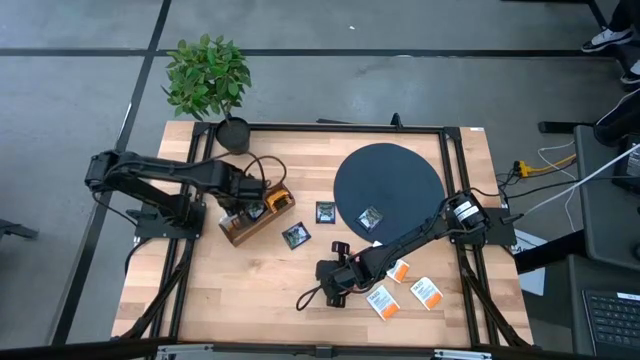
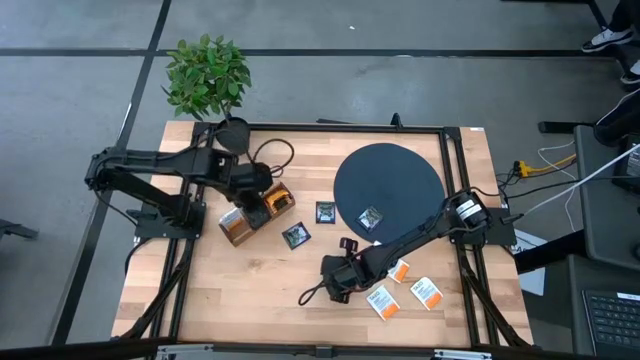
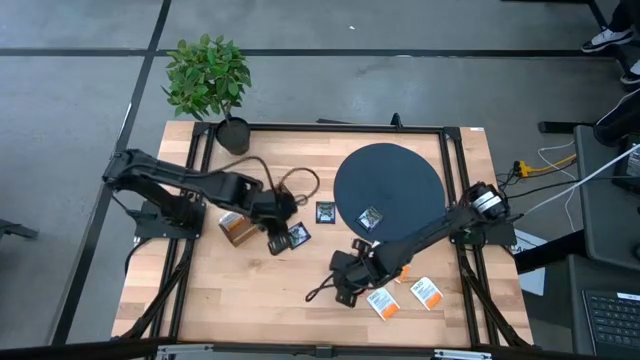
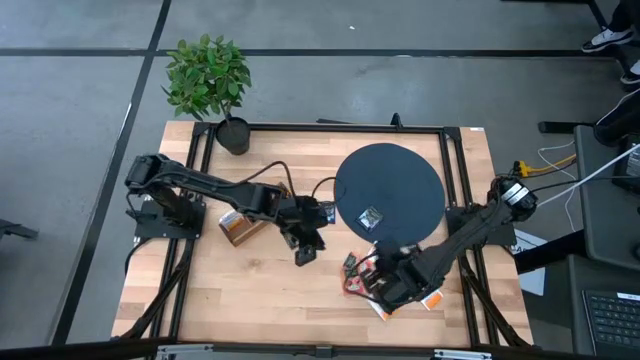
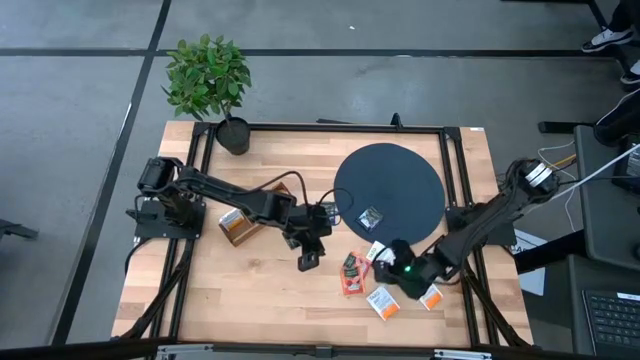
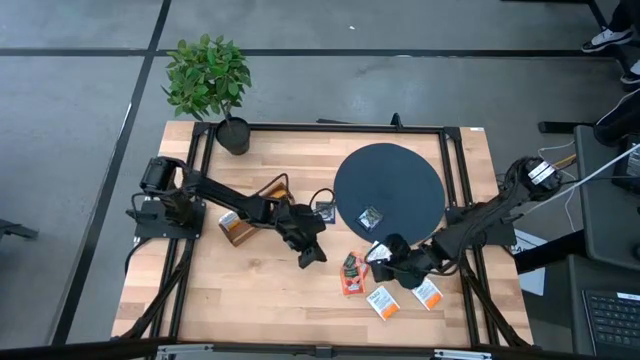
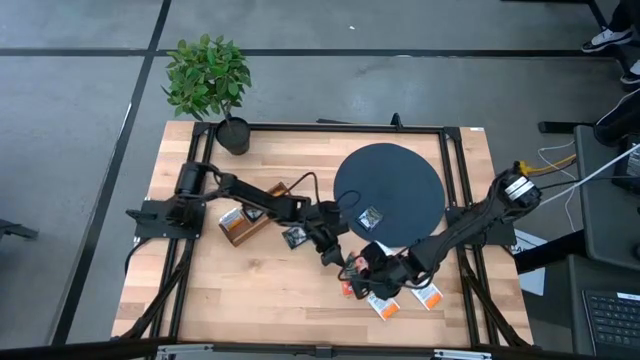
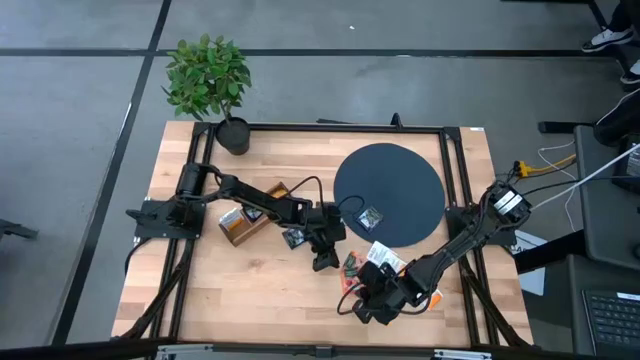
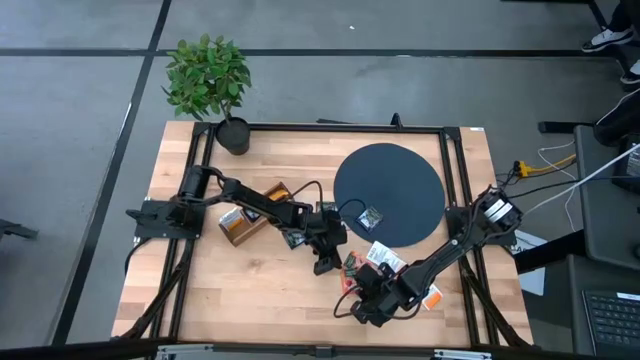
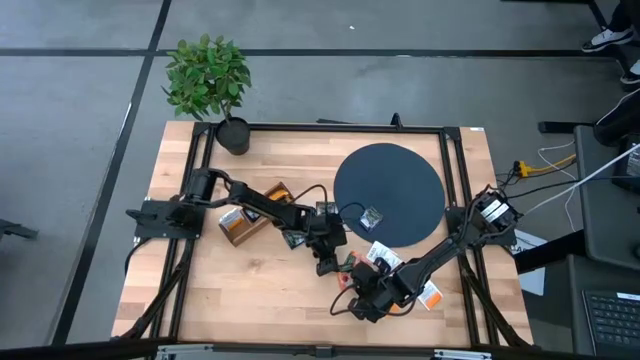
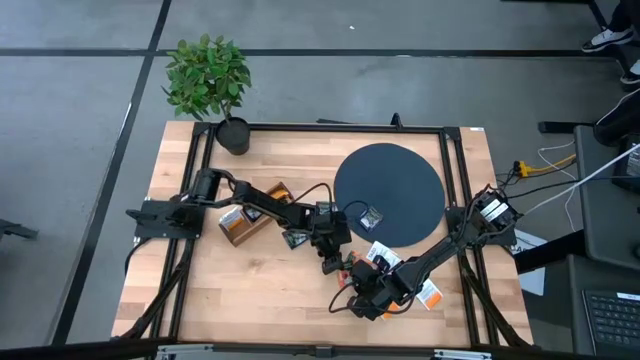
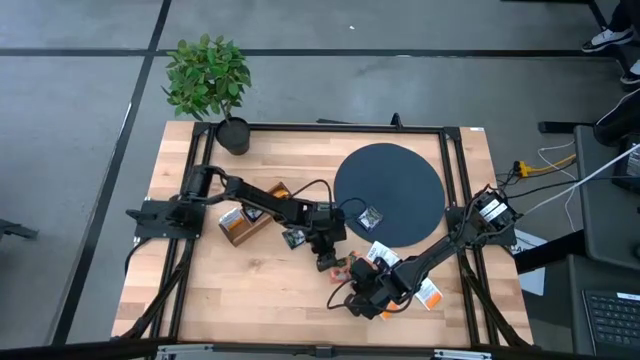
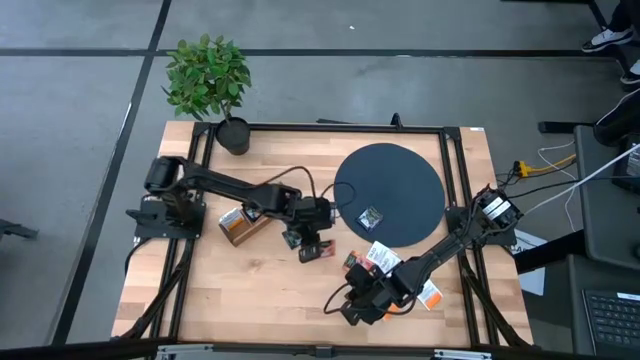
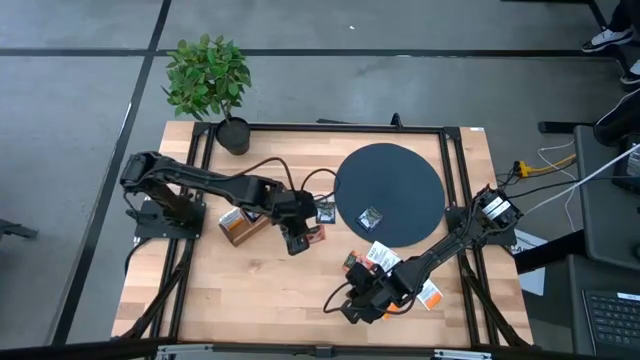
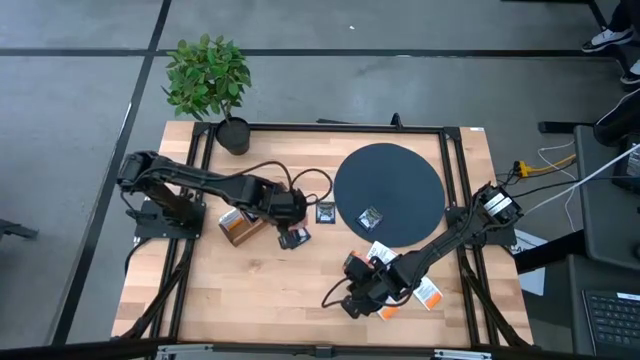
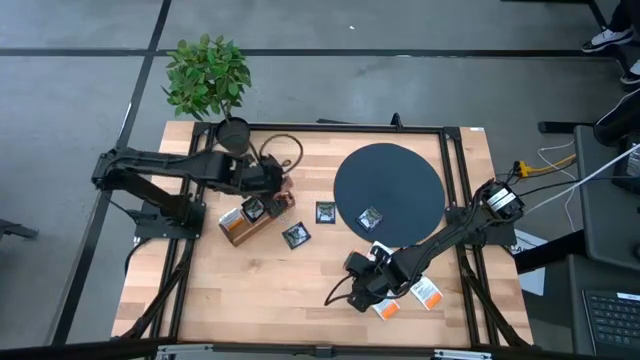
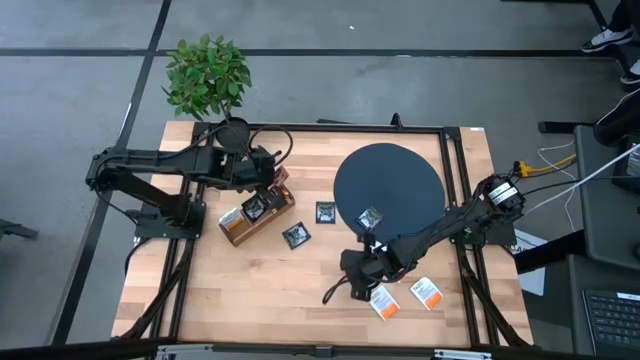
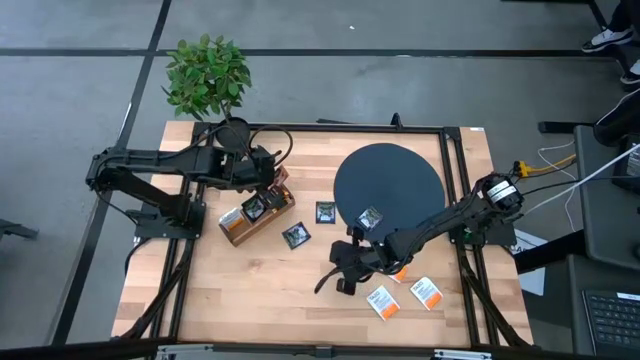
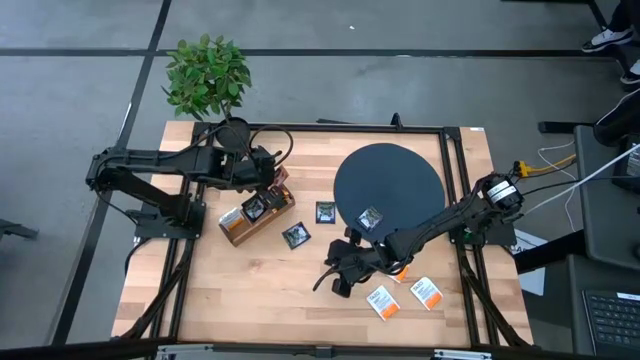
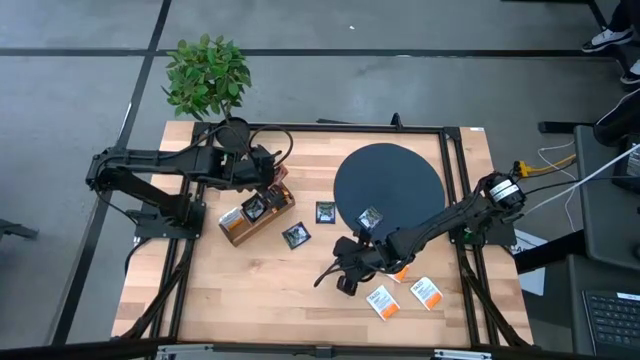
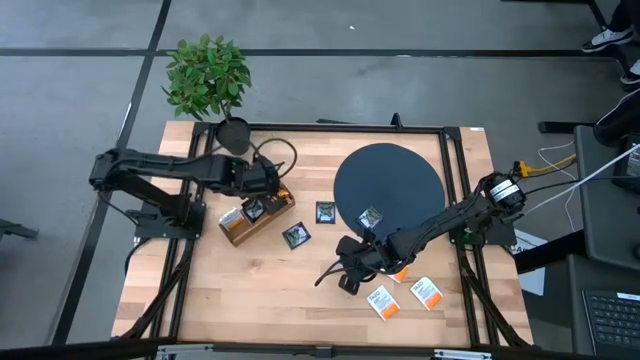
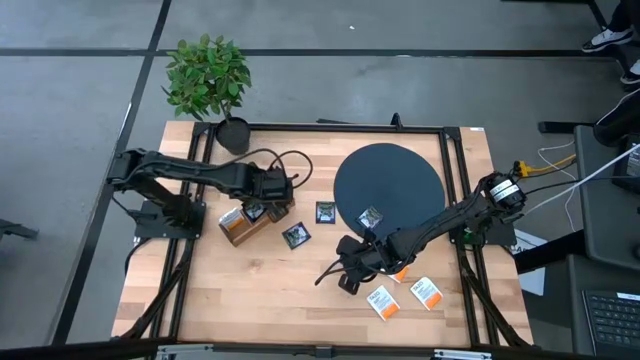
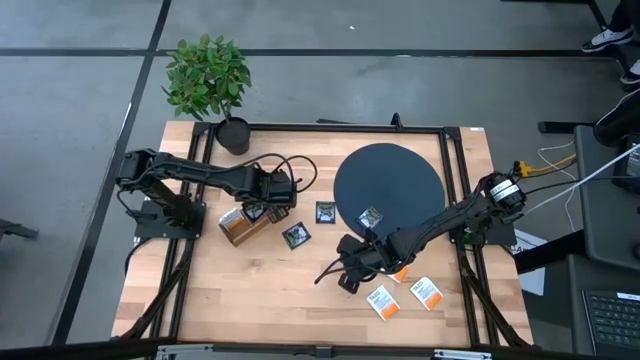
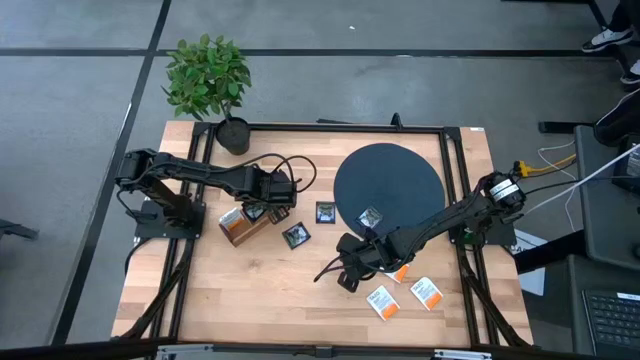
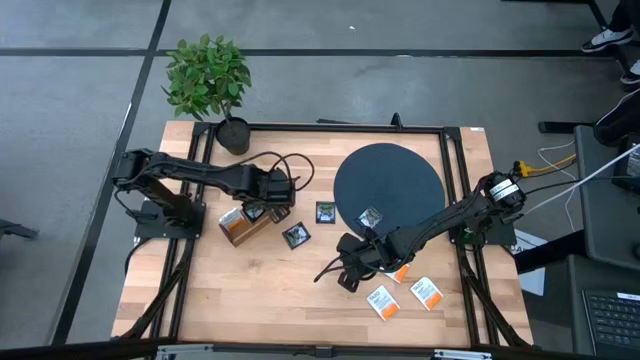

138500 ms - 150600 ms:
Task: Pick & Place Tea
Put the orange tea bag into the right section of the wooden organizer

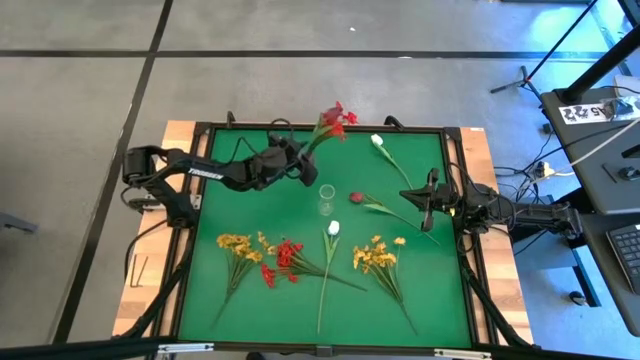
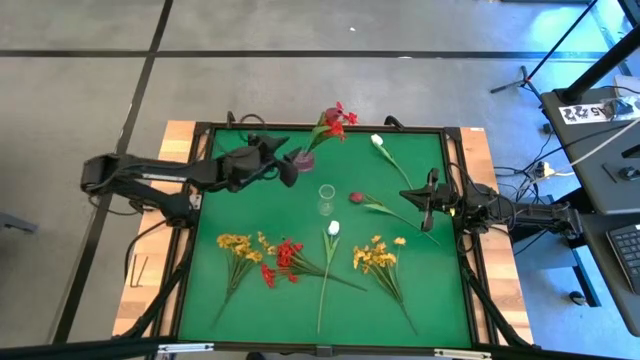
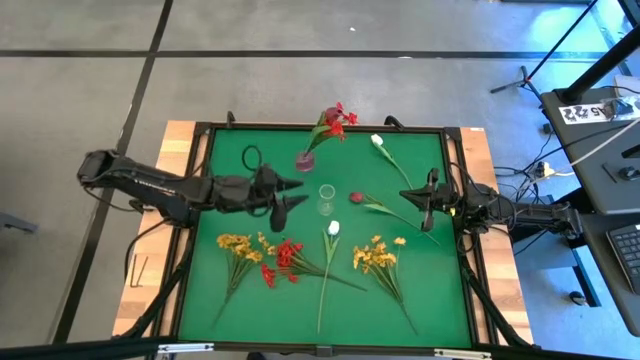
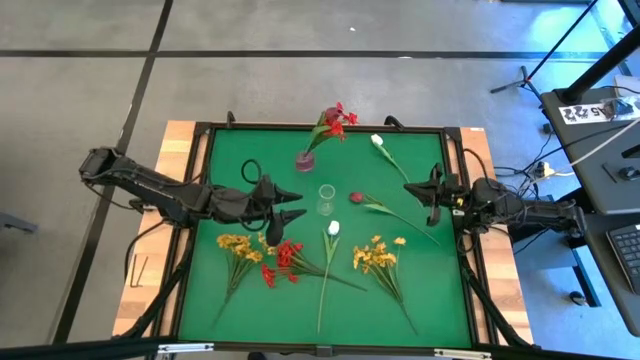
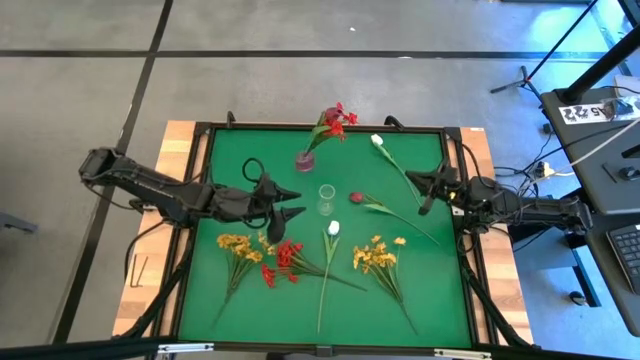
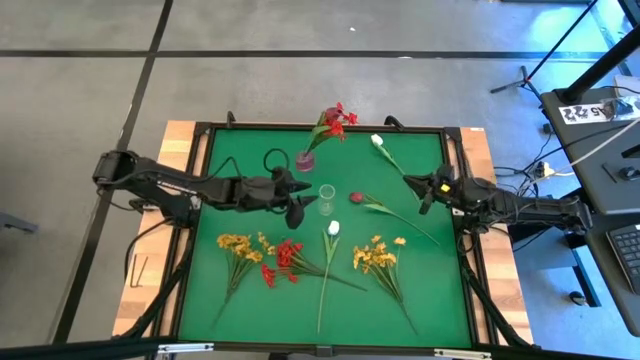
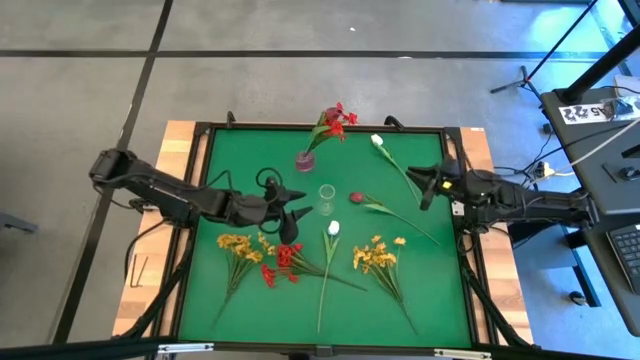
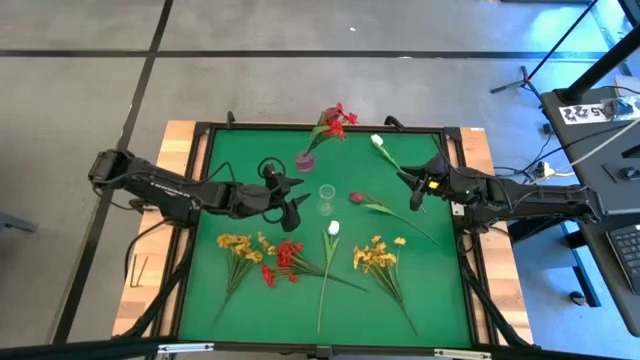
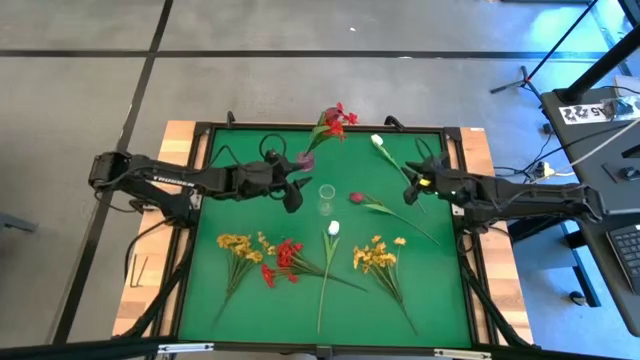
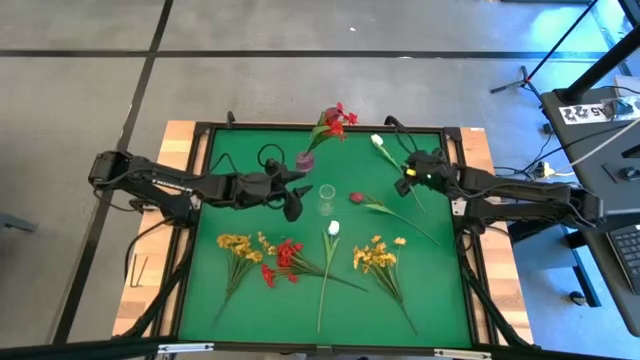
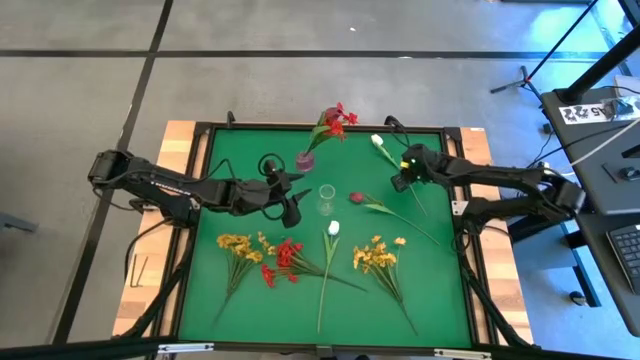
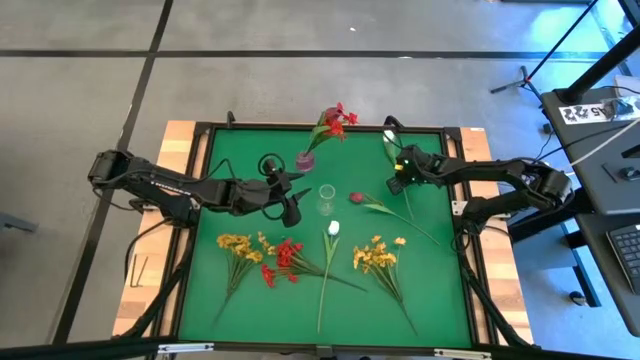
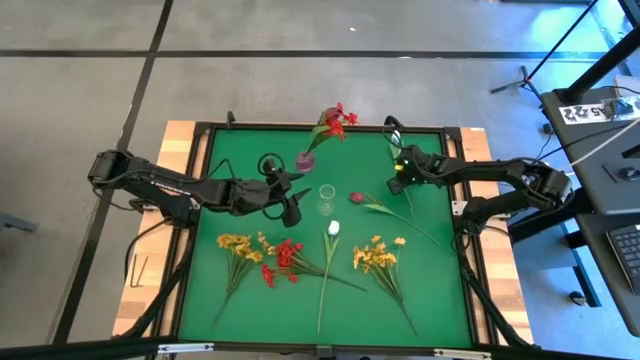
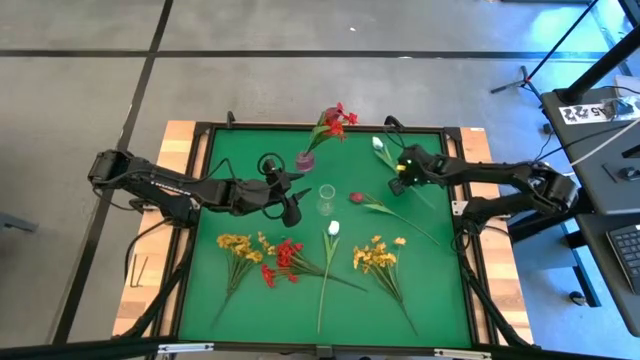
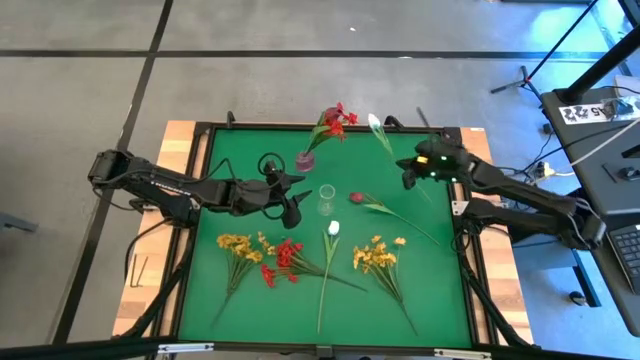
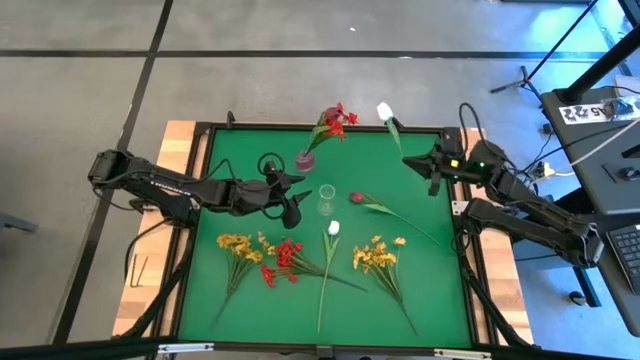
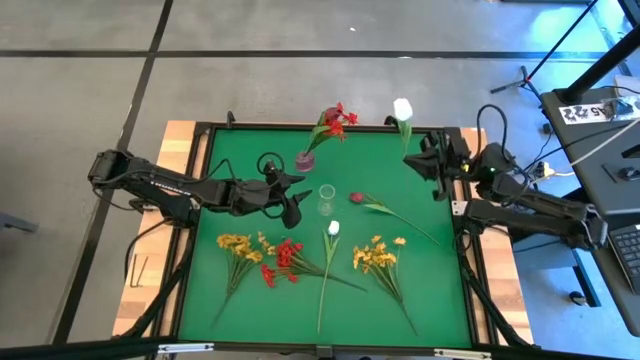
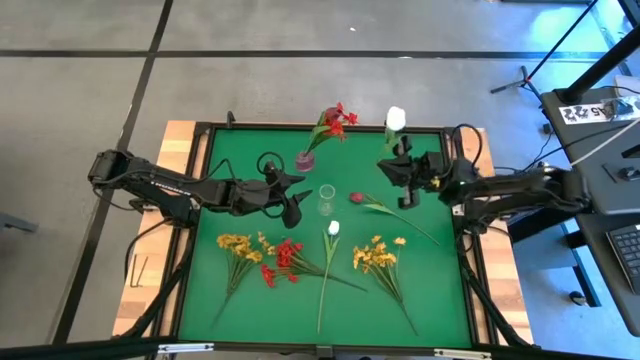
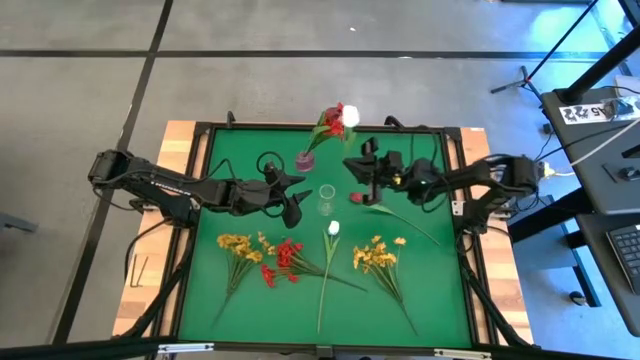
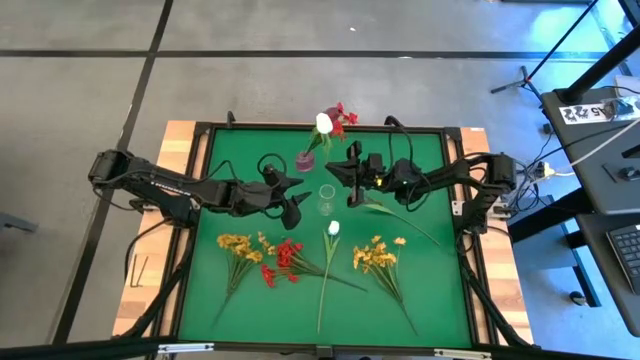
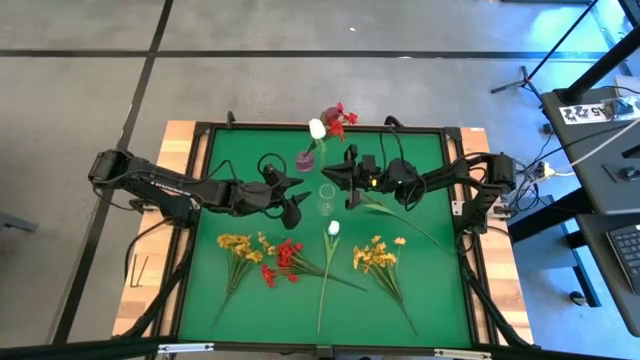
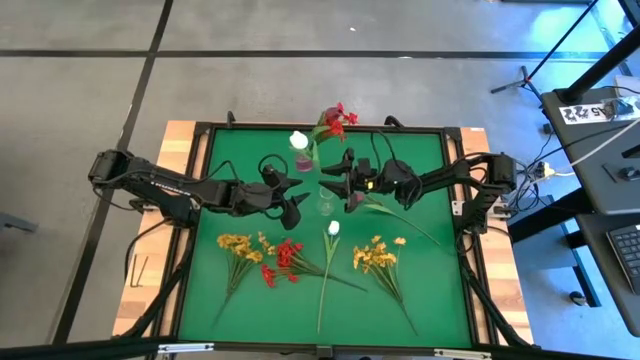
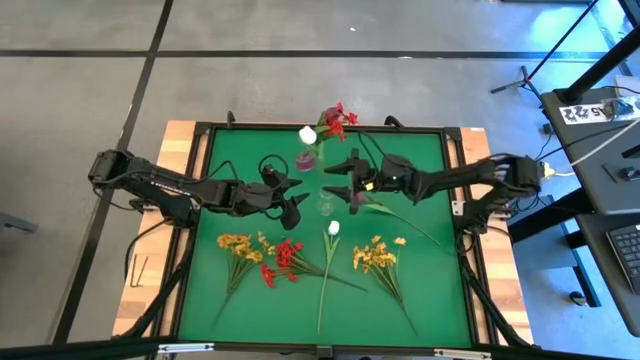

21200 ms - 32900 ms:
Task: Sort flowers into vase by color
Put the top white flower into the transparent vase
